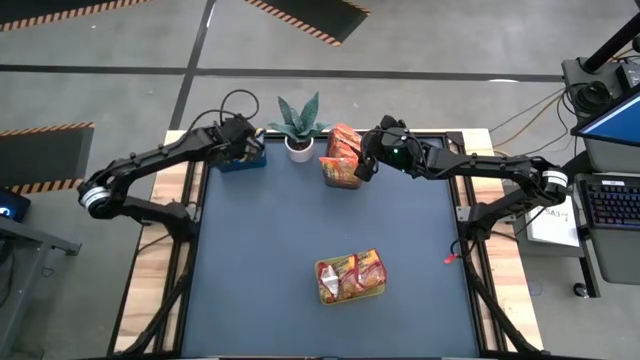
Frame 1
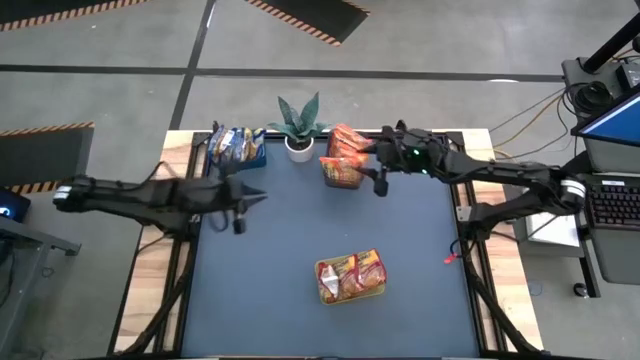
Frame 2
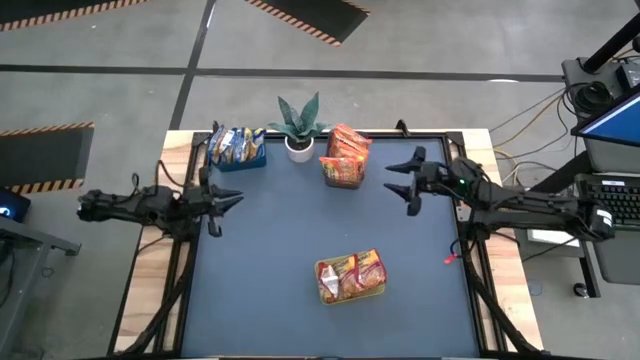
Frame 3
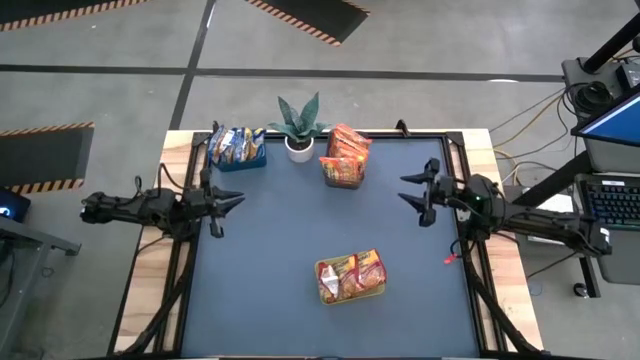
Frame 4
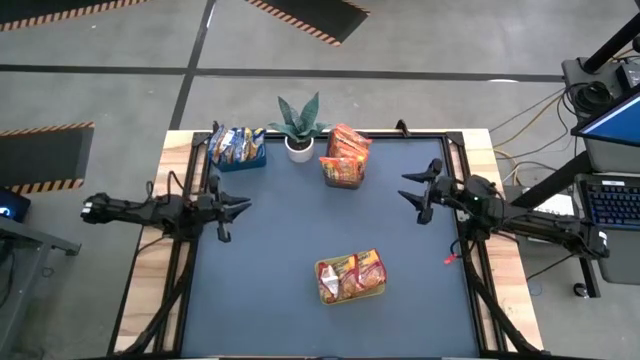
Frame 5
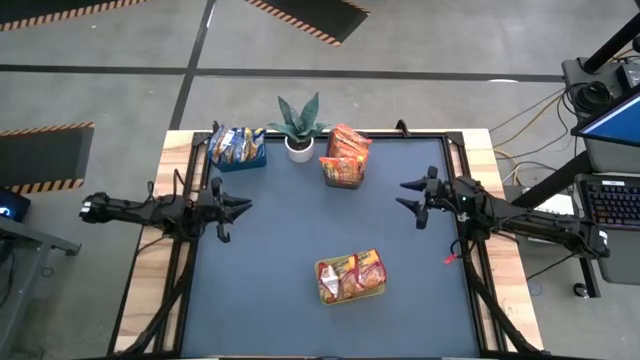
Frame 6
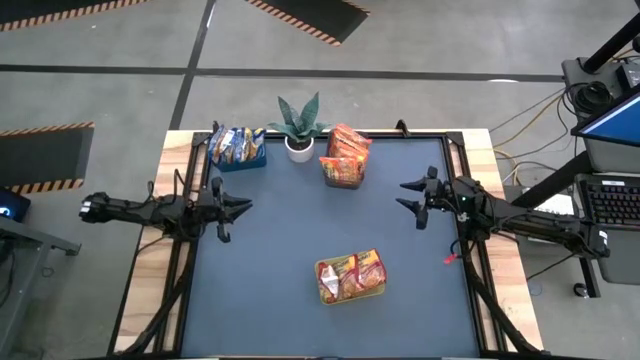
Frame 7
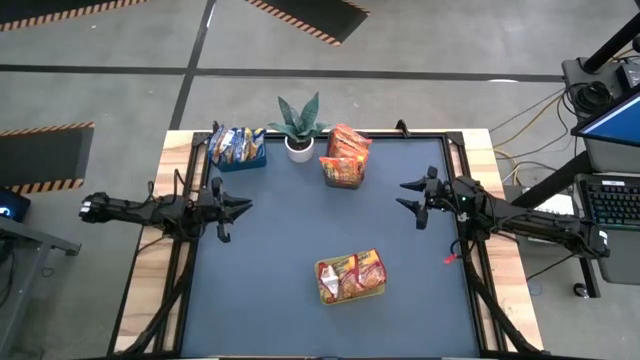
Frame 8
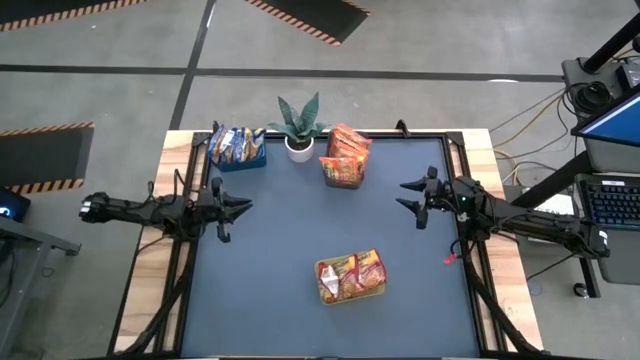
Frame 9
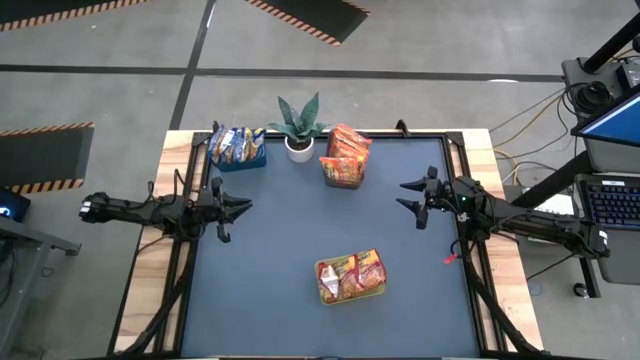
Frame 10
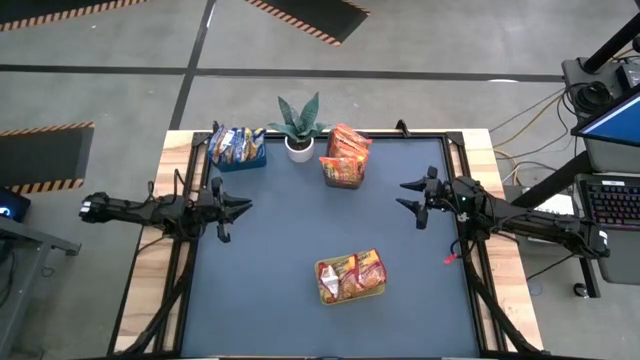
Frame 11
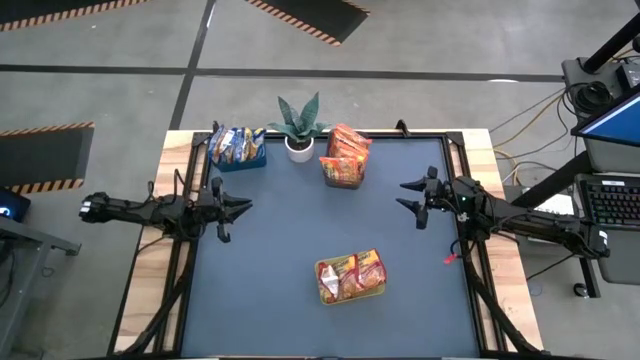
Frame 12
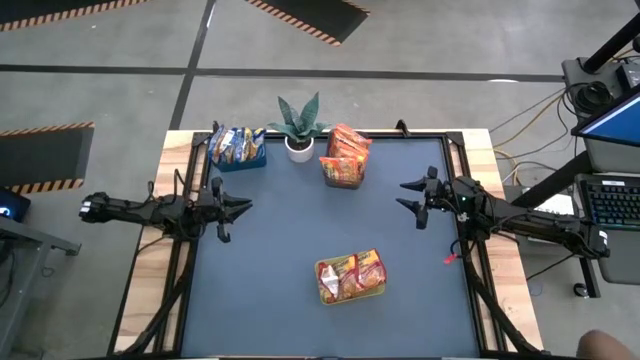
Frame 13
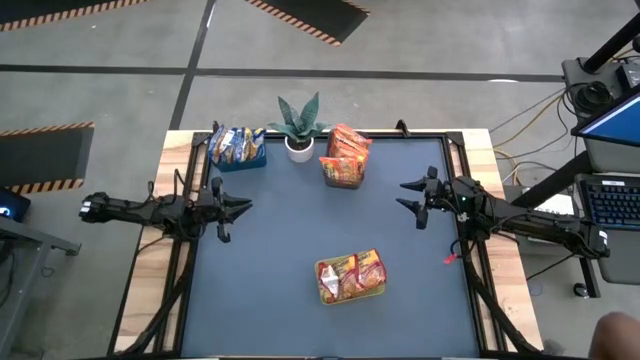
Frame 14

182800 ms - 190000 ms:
Task: Sort Maruchan noodles
Return to Home Position

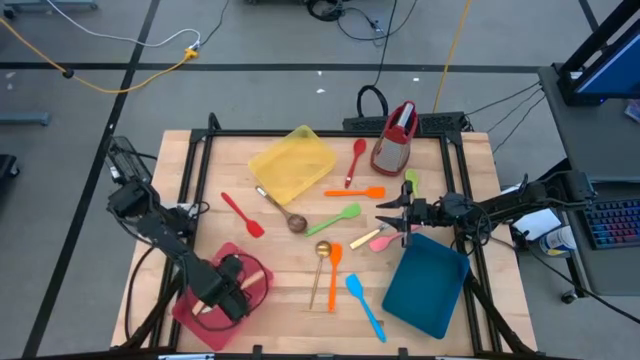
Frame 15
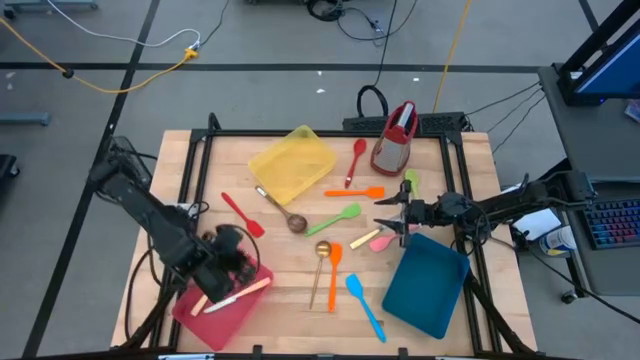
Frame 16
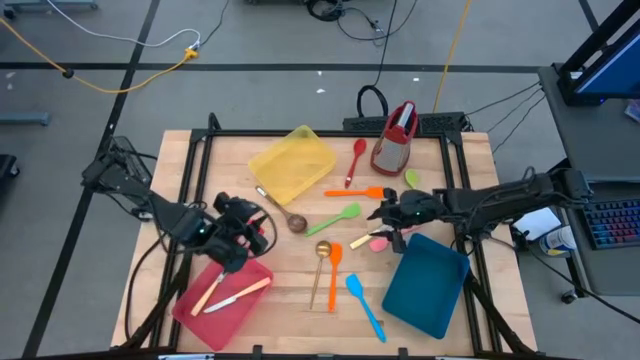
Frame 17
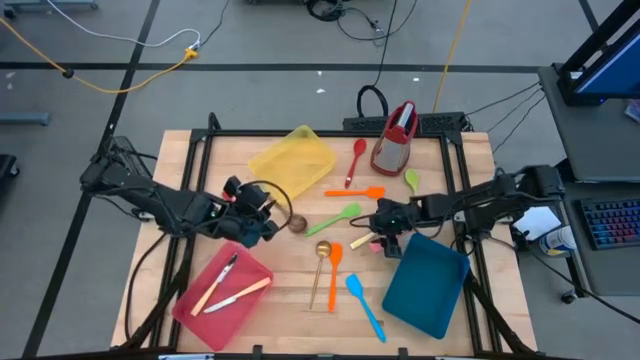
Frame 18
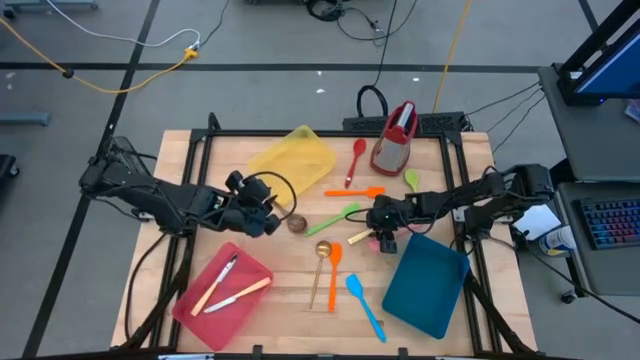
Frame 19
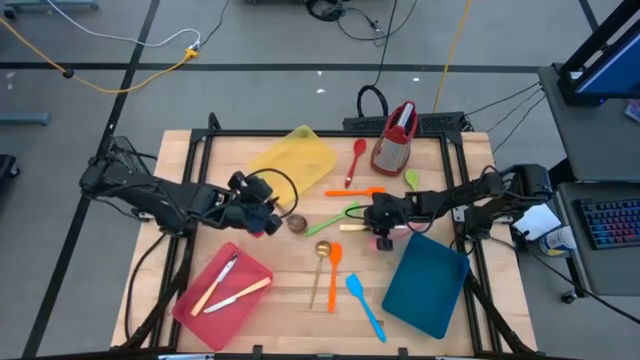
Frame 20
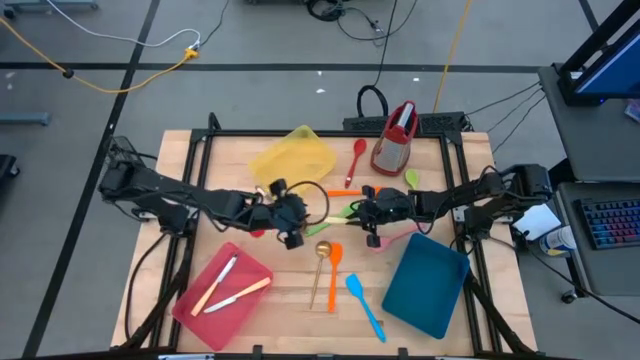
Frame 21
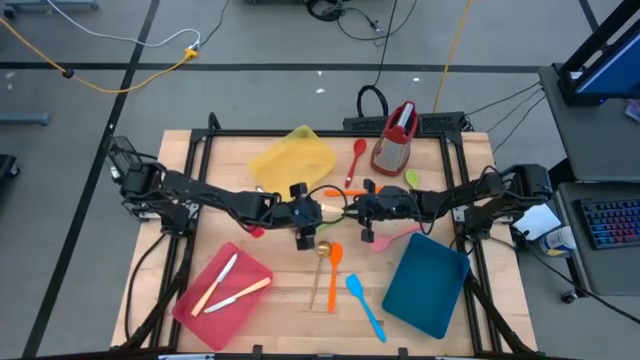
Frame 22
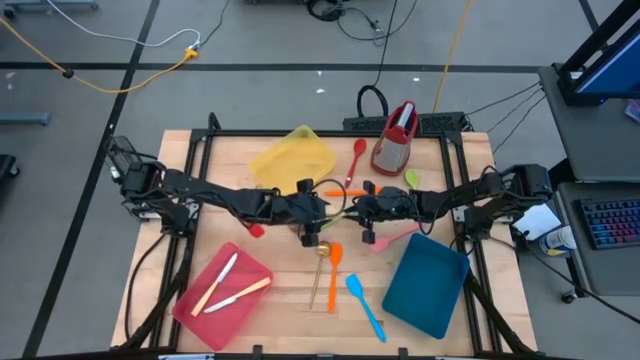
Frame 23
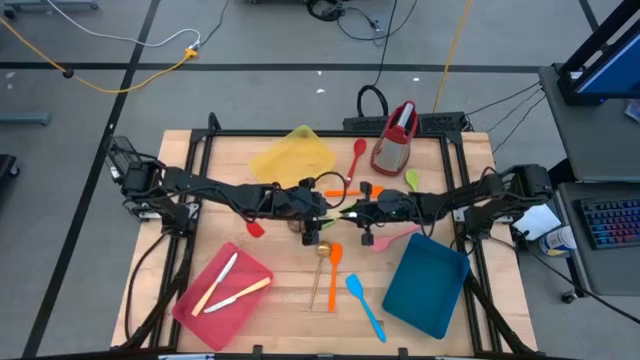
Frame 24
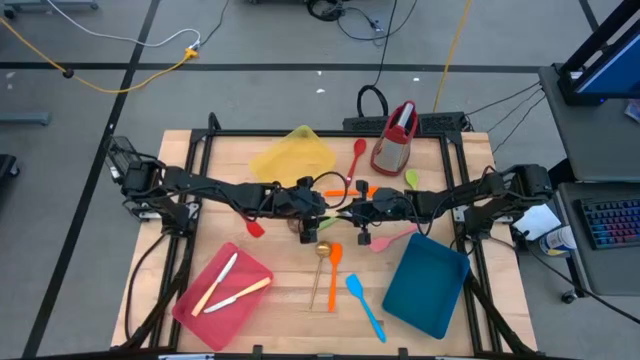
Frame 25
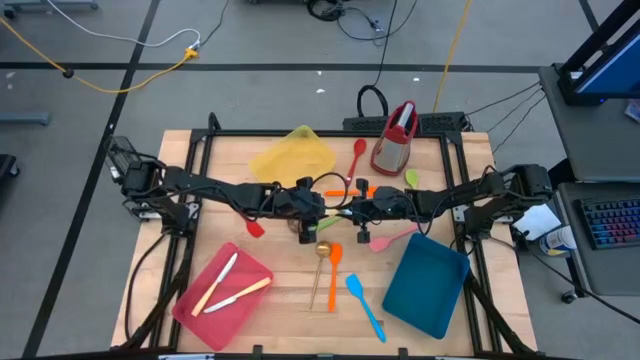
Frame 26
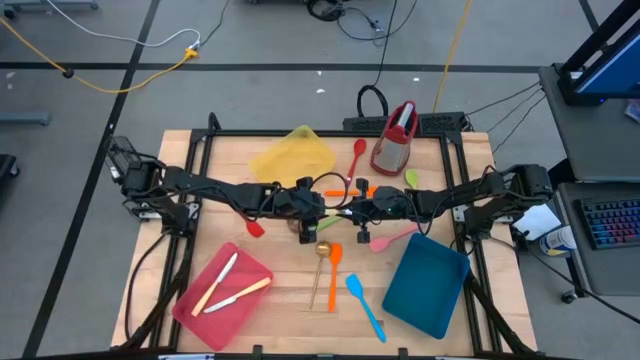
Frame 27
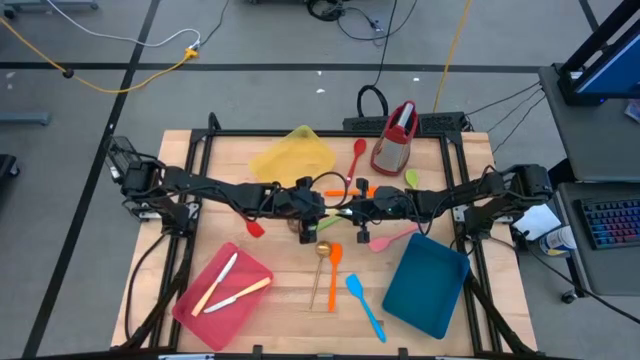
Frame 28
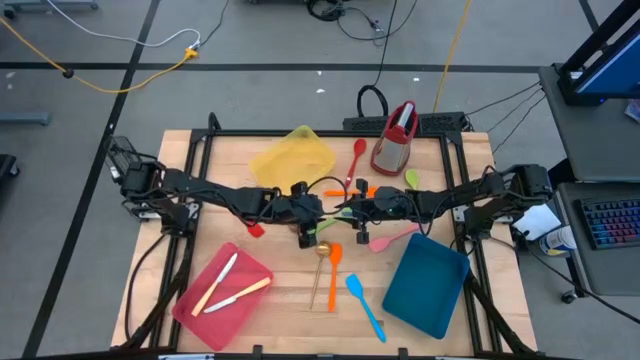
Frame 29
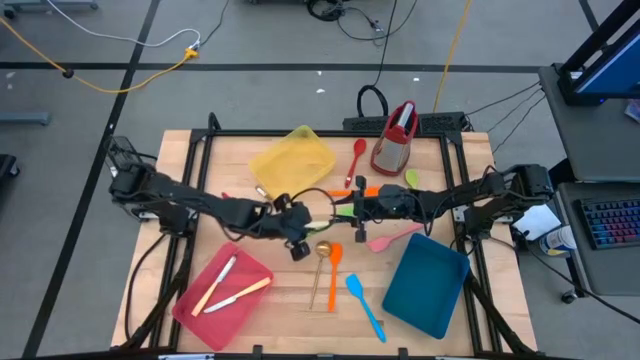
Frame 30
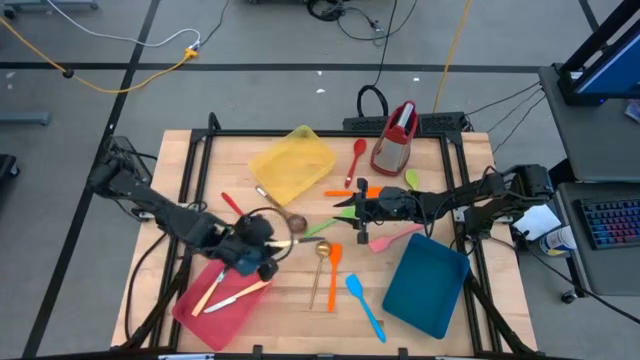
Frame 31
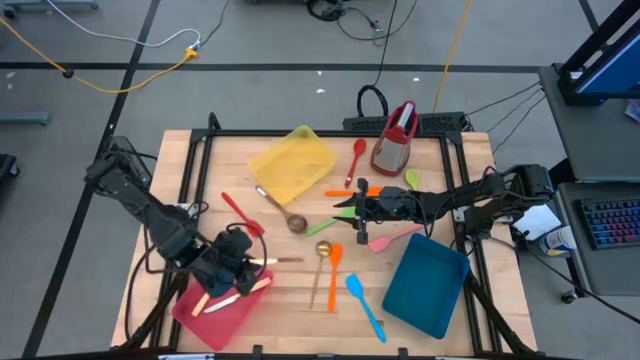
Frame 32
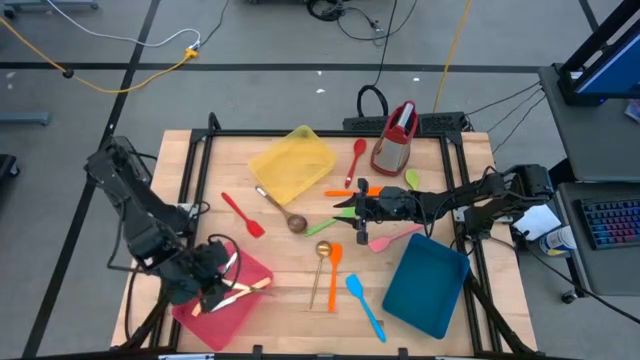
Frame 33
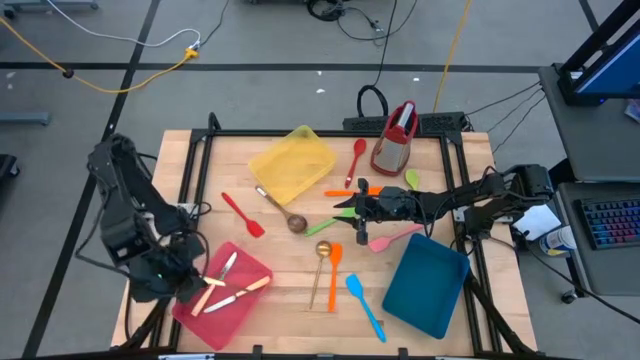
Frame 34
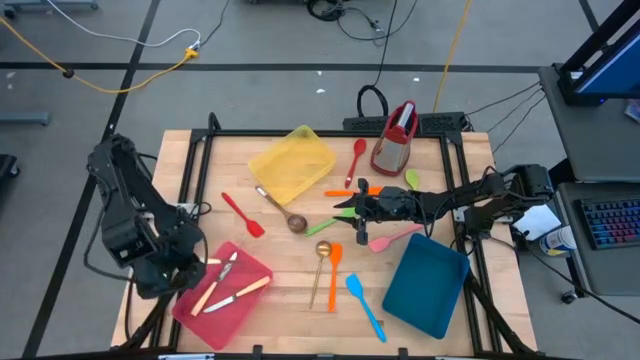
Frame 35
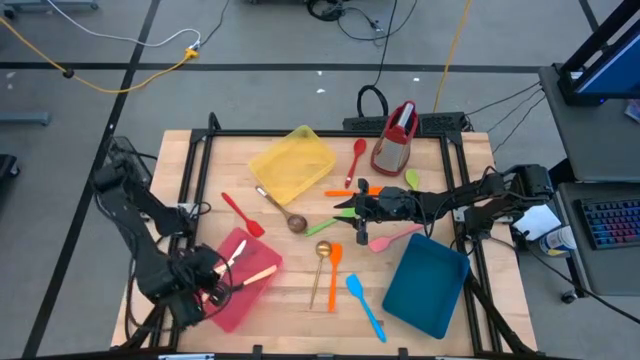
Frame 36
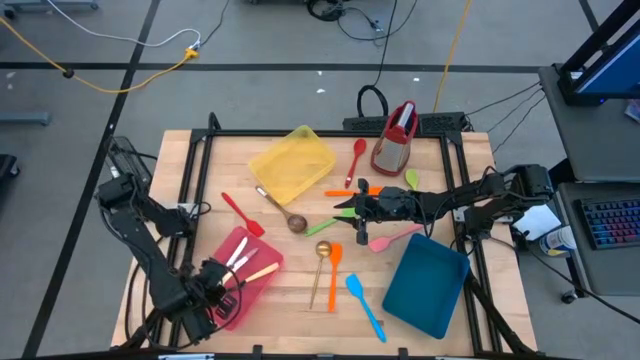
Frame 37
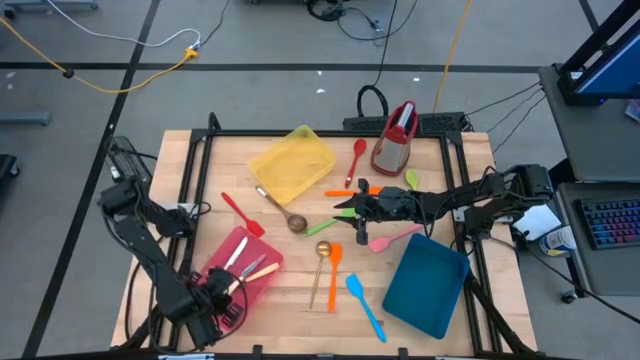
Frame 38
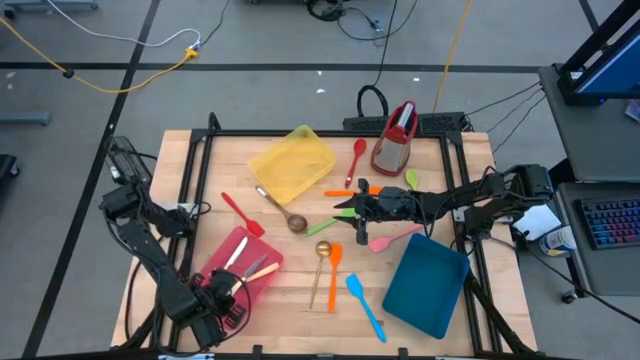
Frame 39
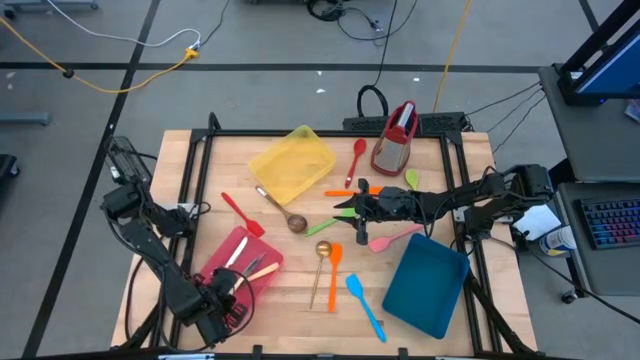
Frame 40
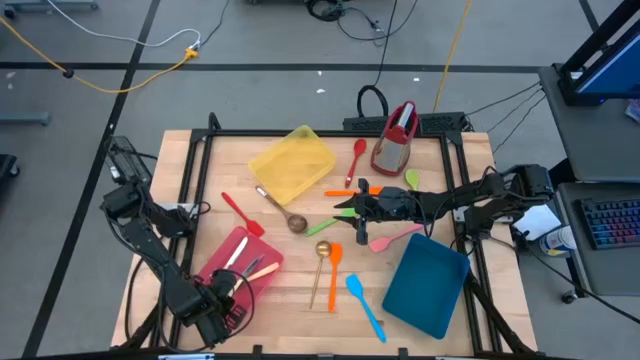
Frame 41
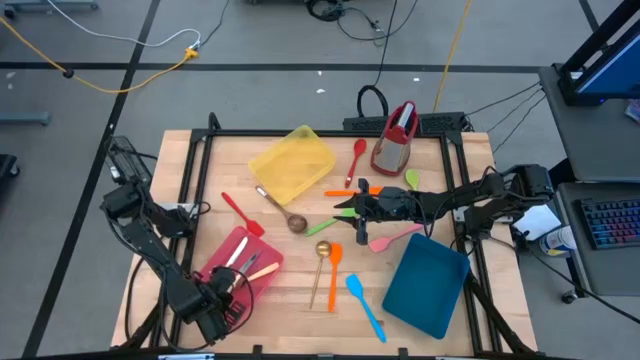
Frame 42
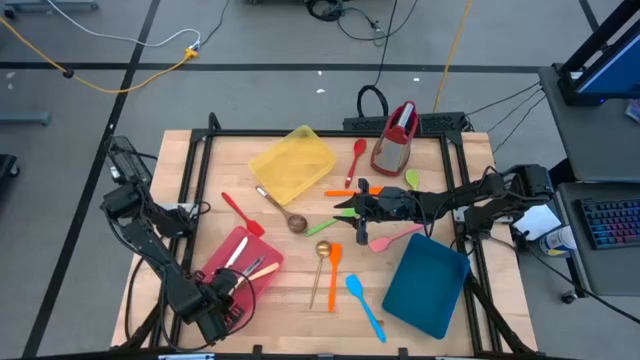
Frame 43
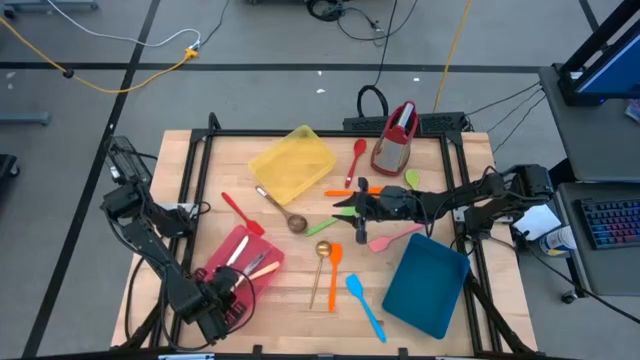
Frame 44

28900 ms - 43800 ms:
Task: Pick & Place Kitchen Items
Put the yellow table knife into the pink bin
